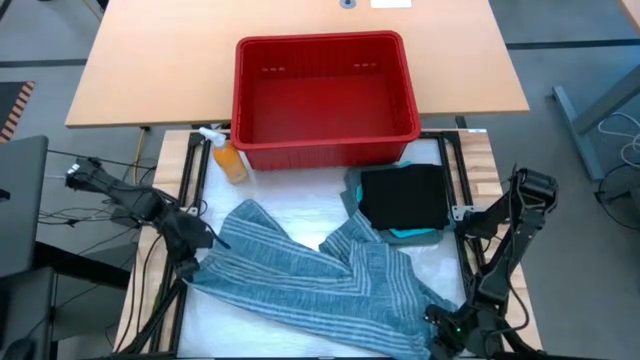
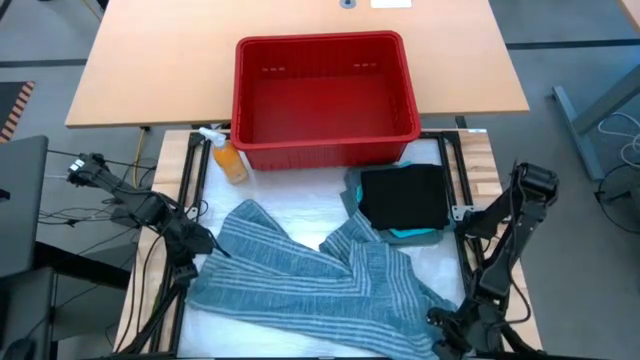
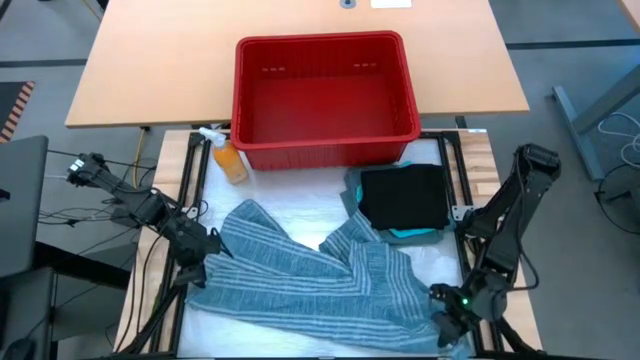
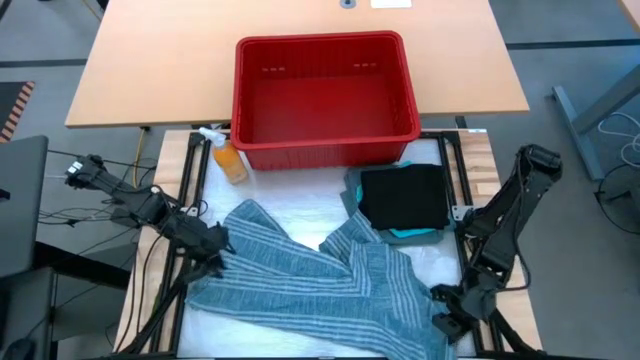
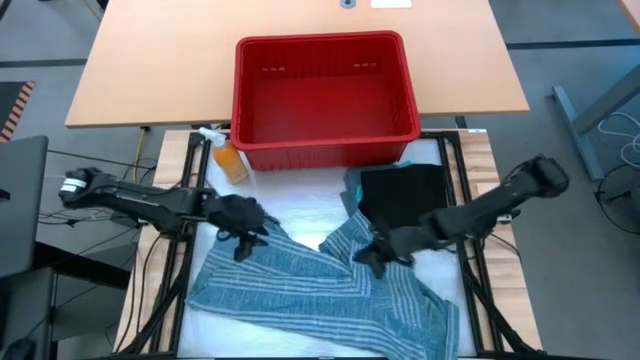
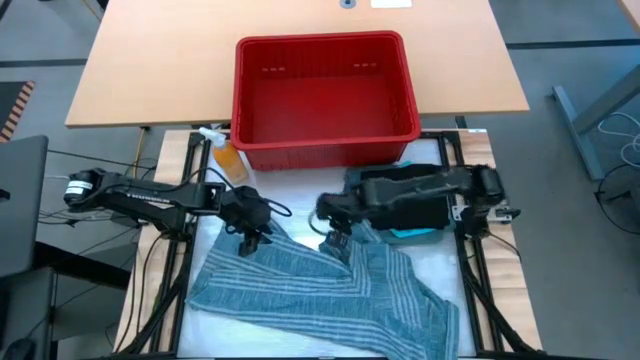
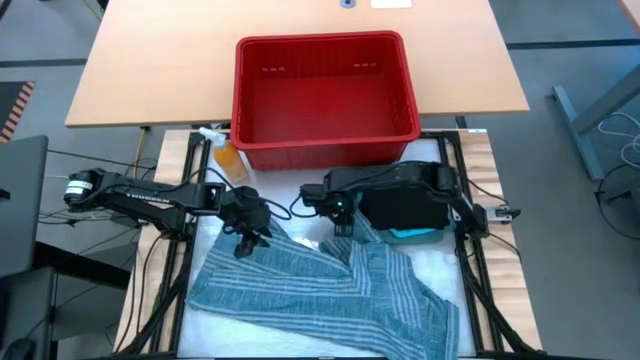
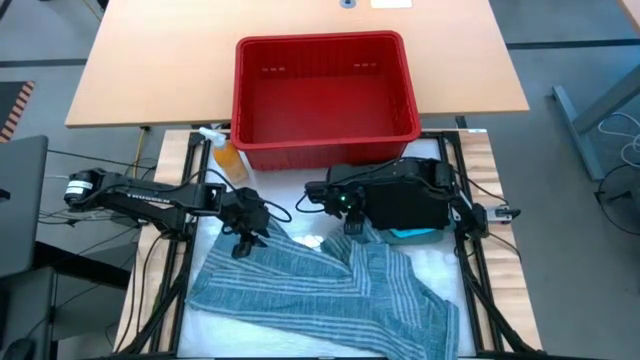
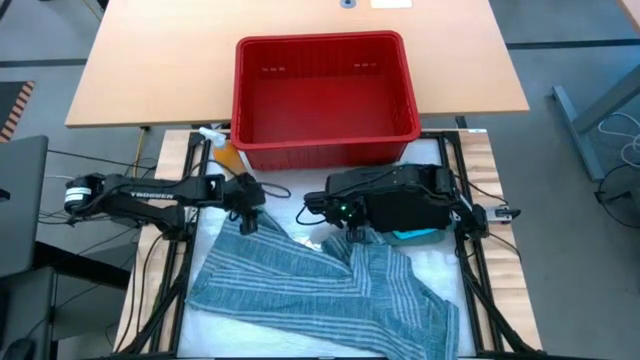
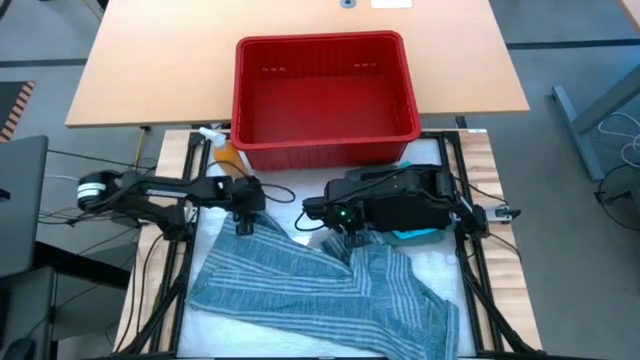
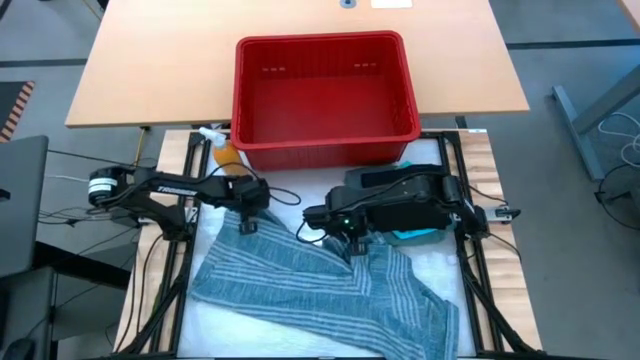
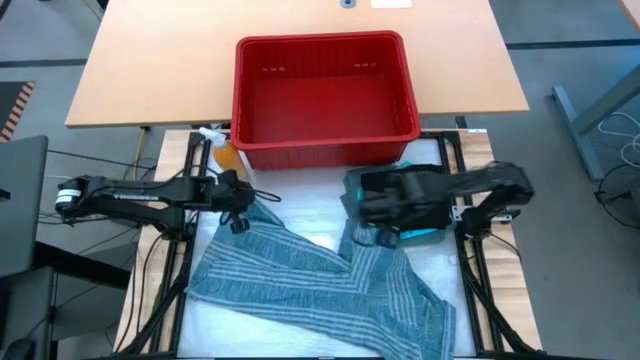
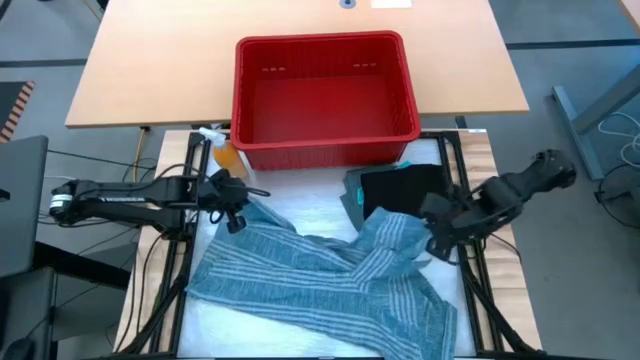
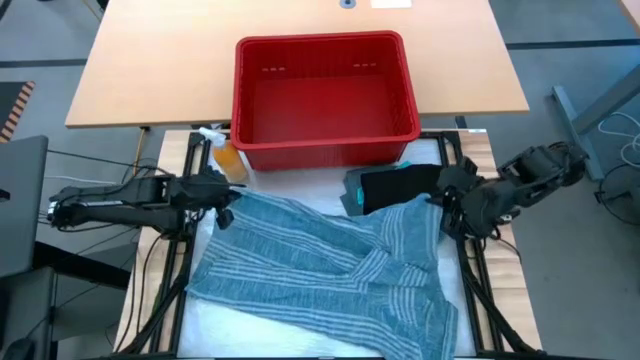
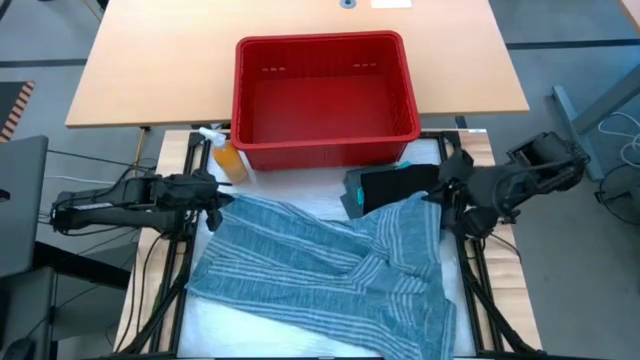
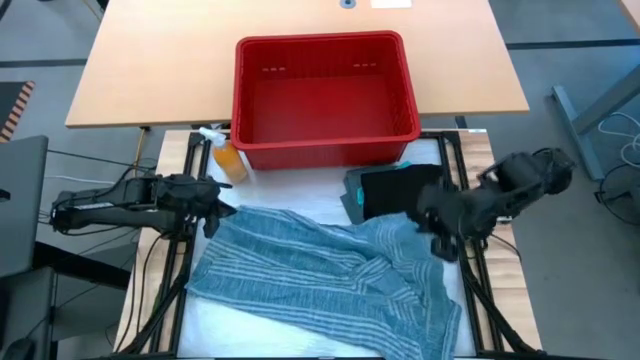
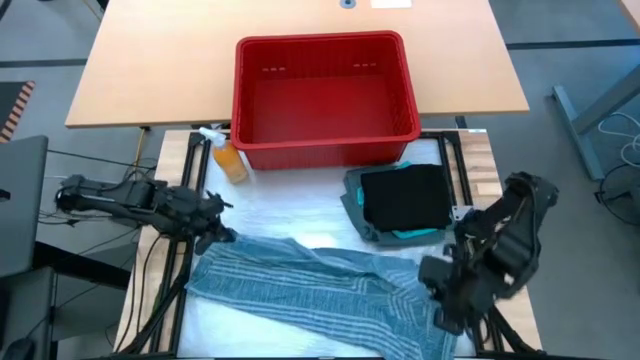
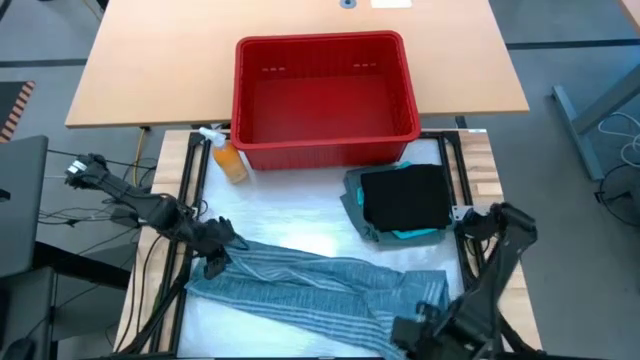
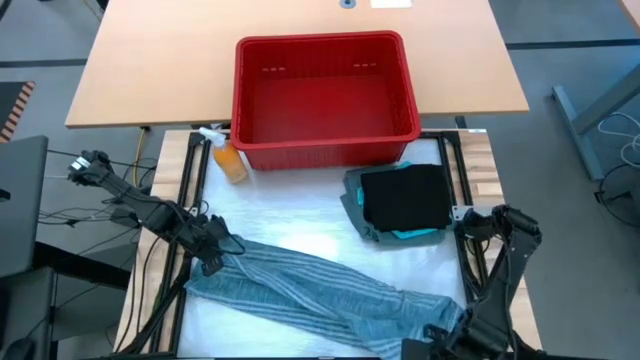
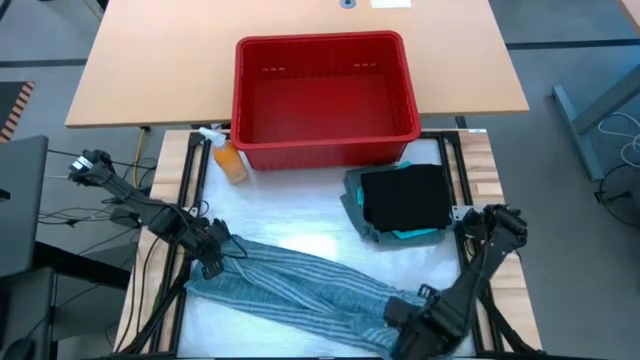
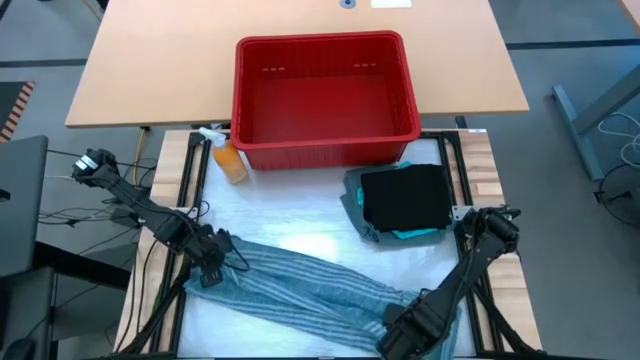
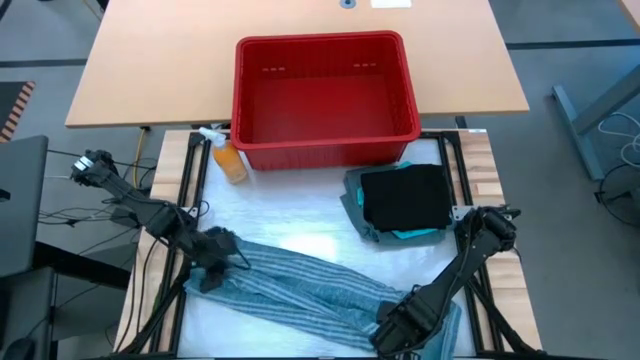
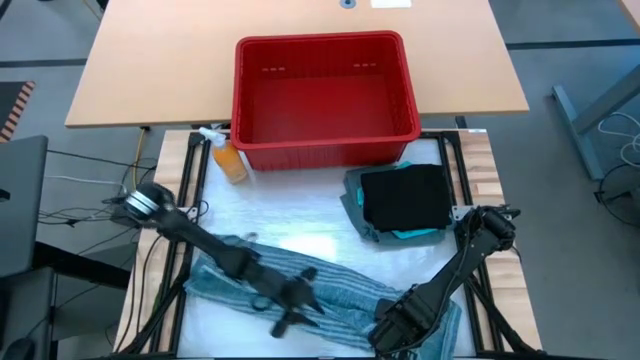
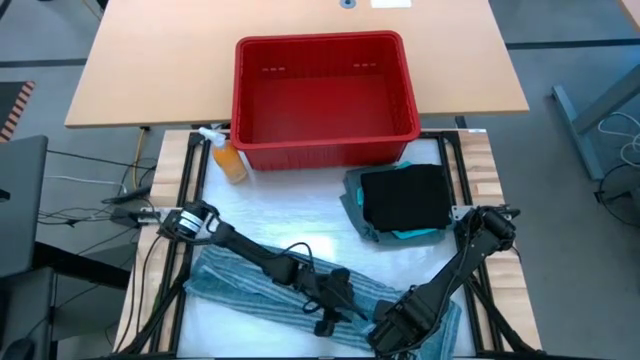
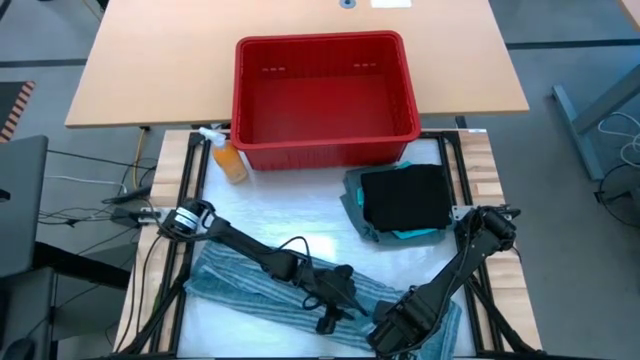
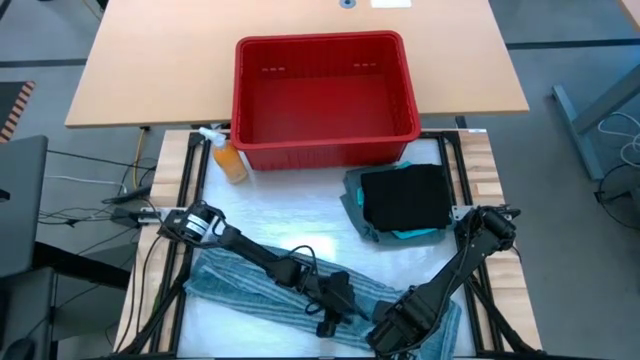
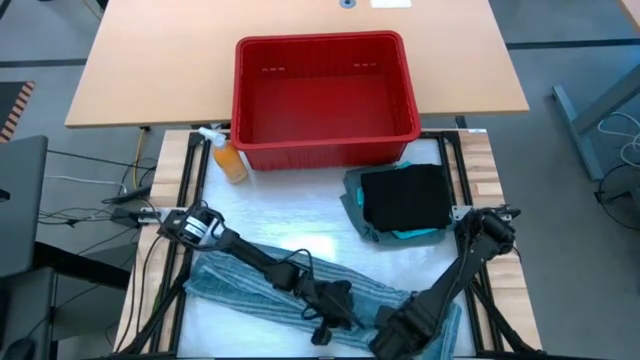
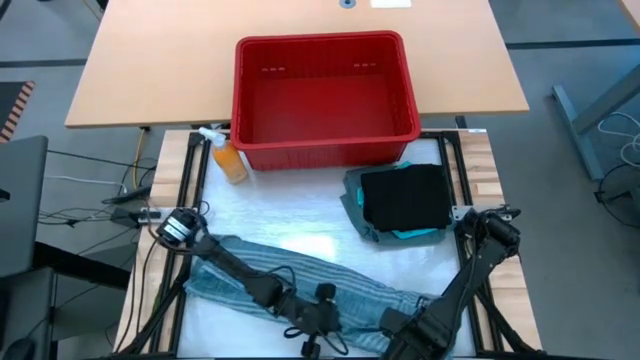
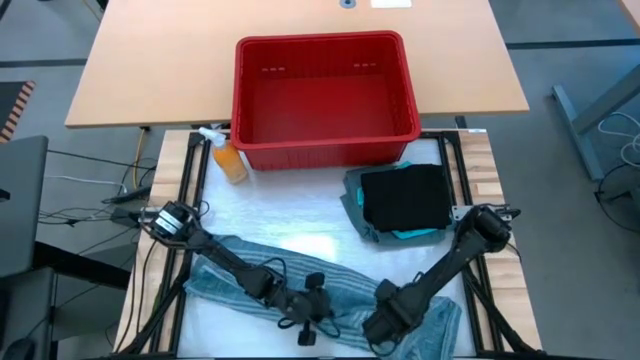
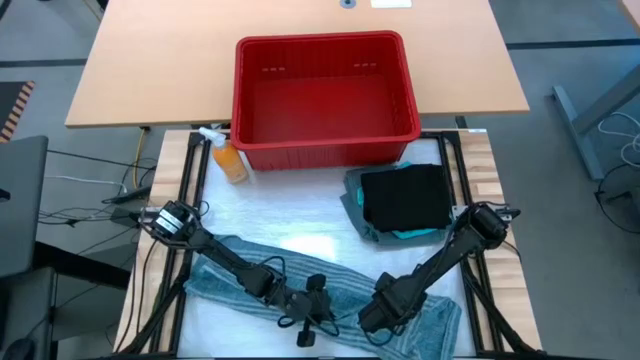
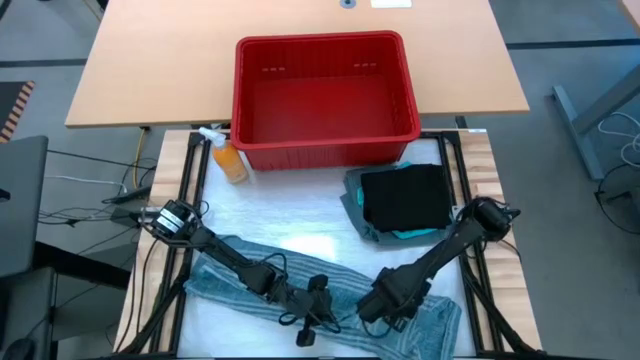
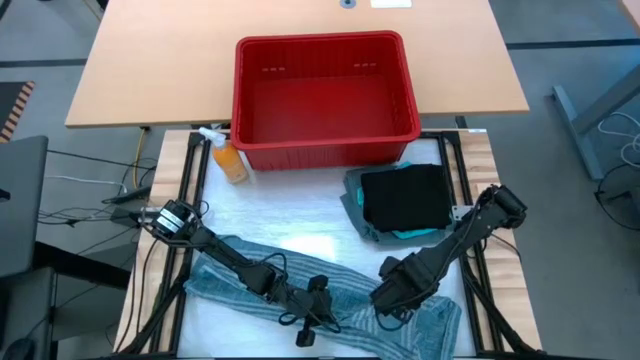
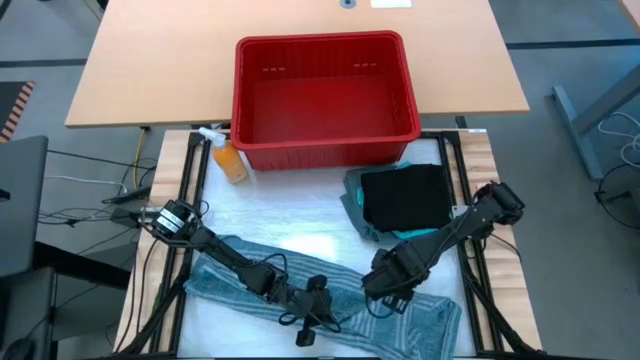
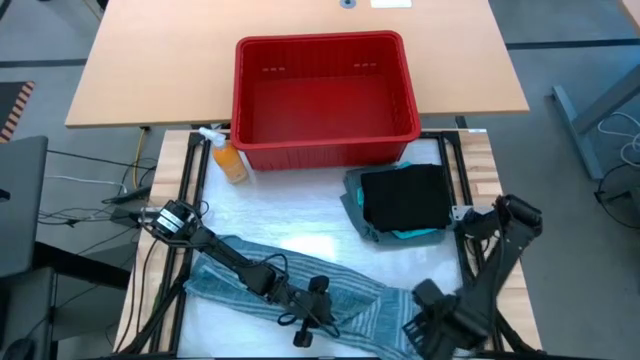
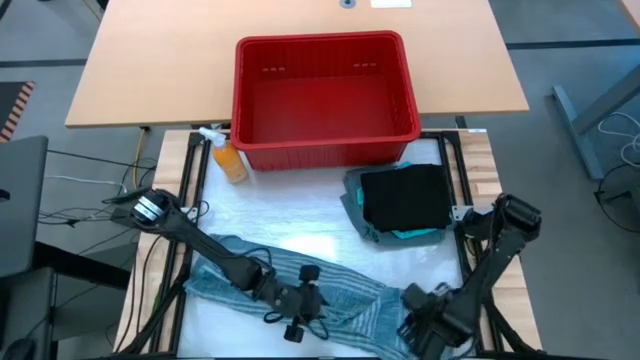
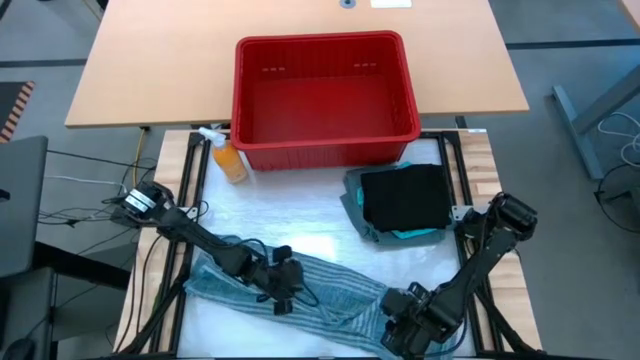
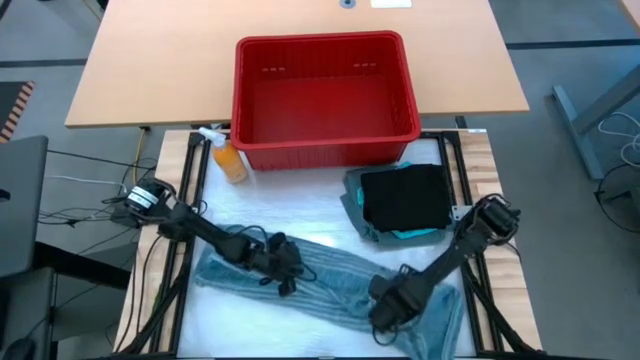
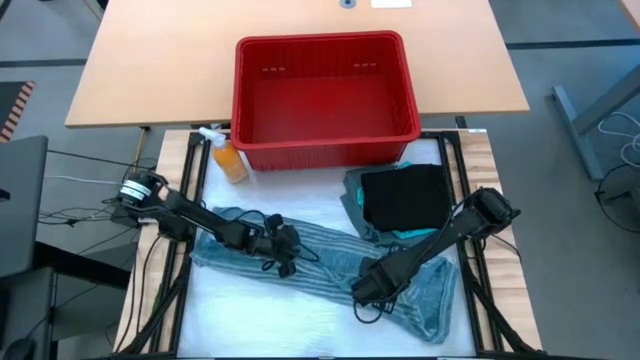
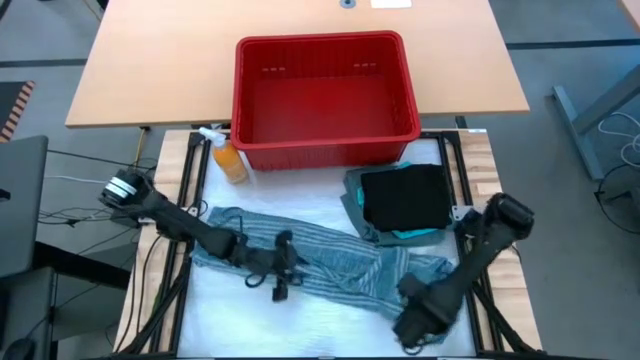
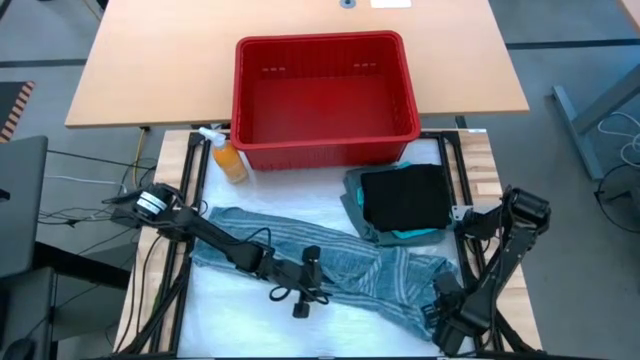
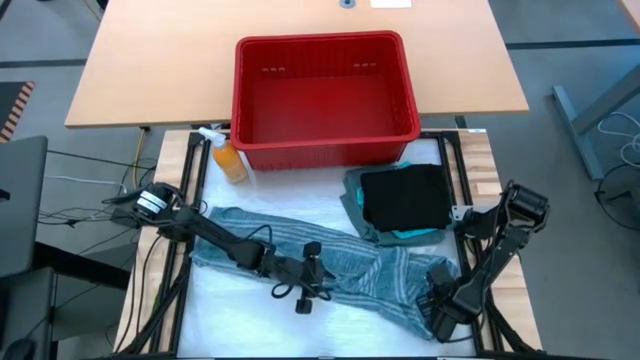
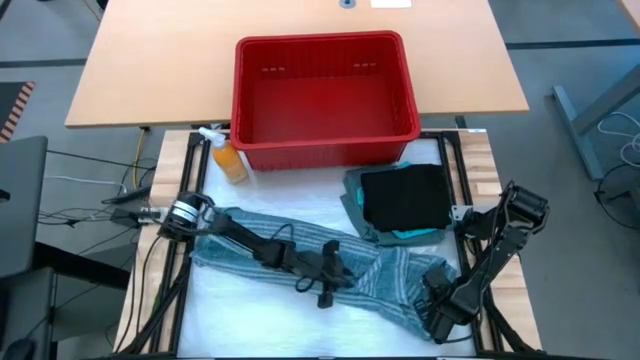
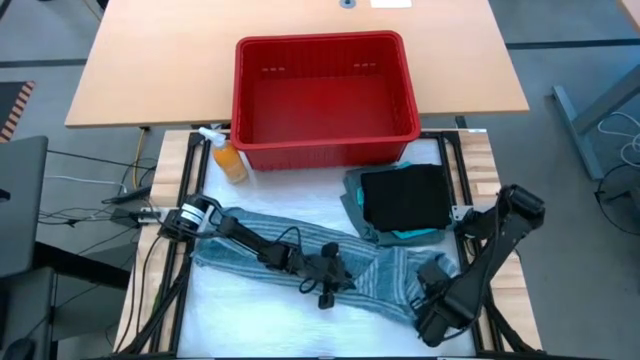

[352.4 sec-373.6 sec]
Task: Fold Laundry from Bin
Fold the blue patterned polo
